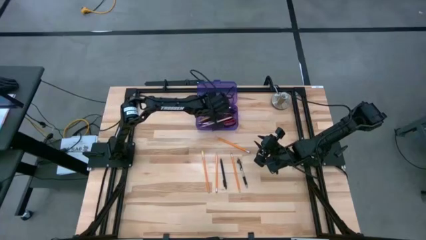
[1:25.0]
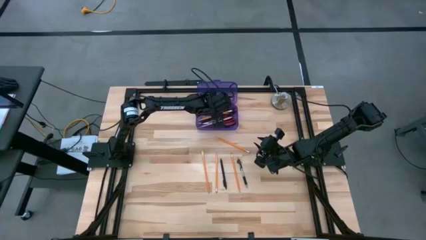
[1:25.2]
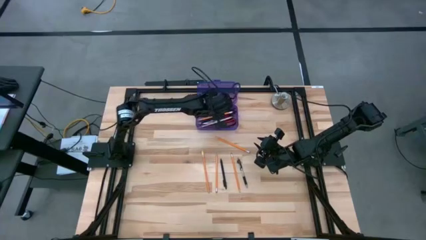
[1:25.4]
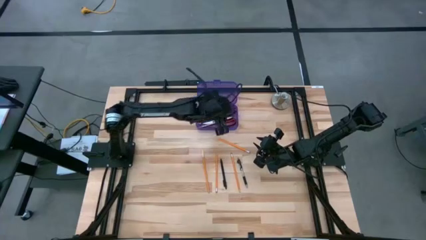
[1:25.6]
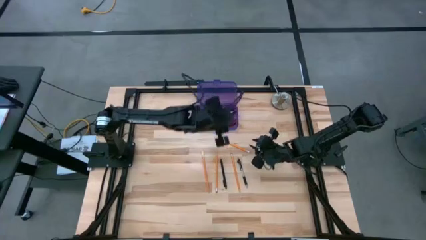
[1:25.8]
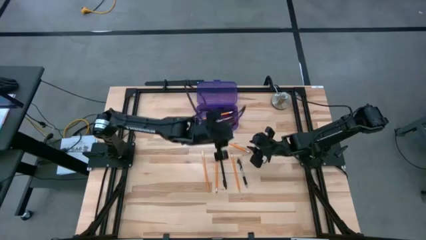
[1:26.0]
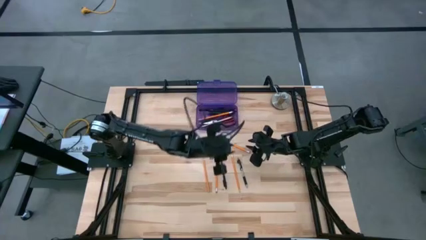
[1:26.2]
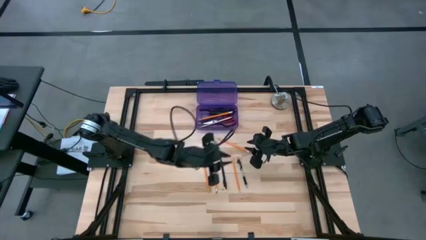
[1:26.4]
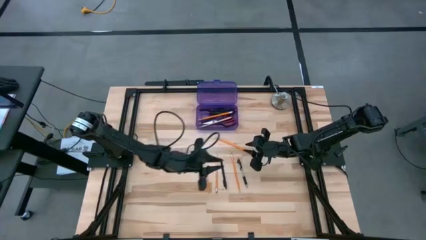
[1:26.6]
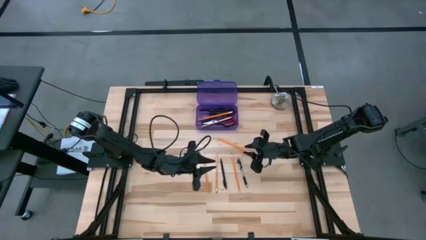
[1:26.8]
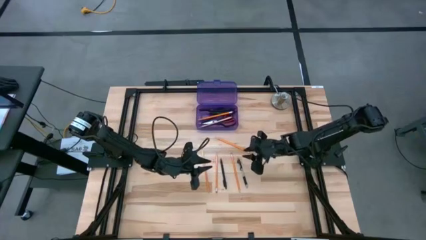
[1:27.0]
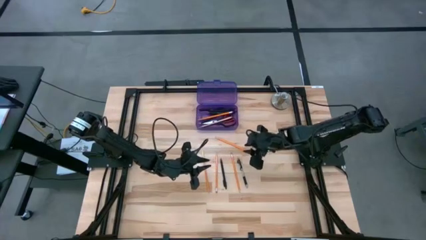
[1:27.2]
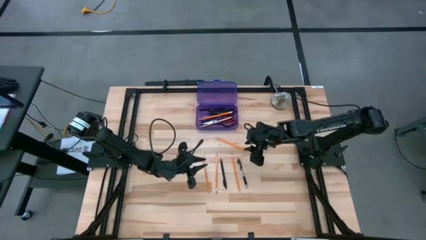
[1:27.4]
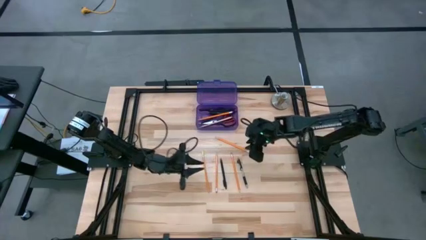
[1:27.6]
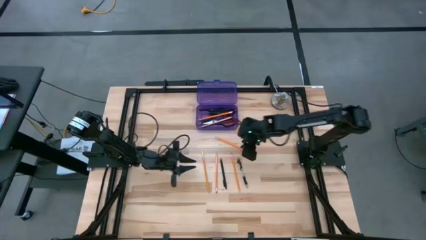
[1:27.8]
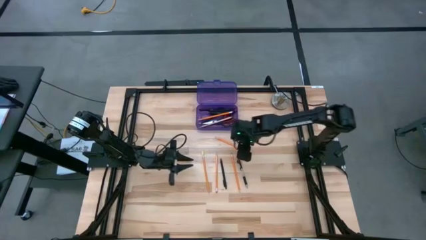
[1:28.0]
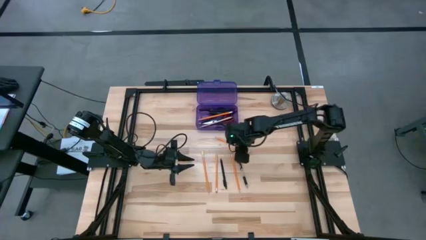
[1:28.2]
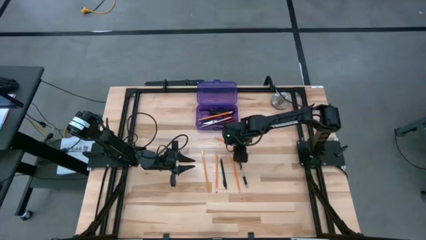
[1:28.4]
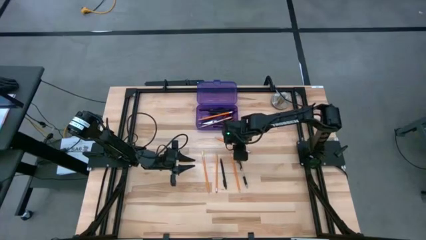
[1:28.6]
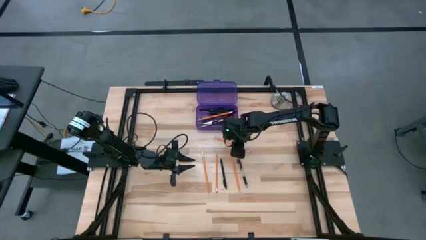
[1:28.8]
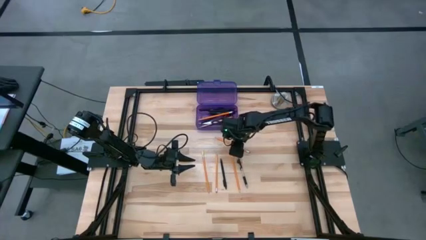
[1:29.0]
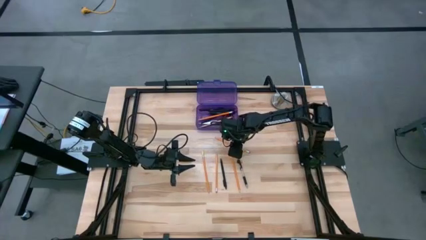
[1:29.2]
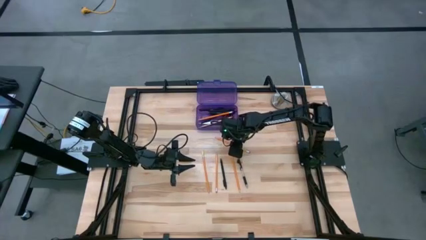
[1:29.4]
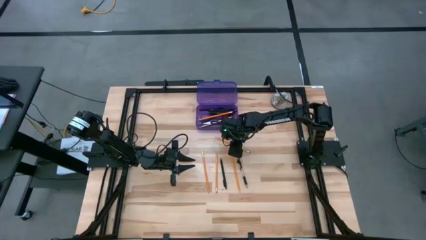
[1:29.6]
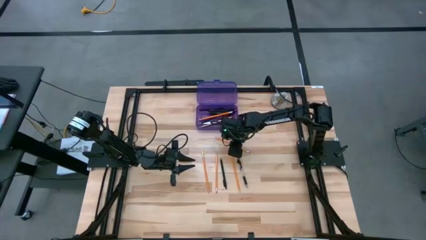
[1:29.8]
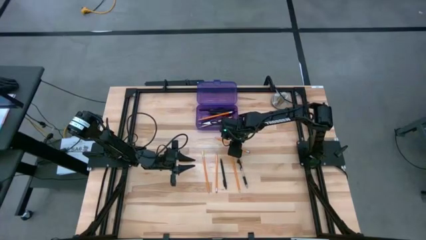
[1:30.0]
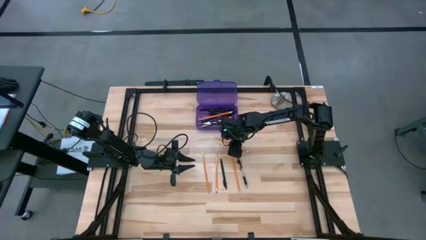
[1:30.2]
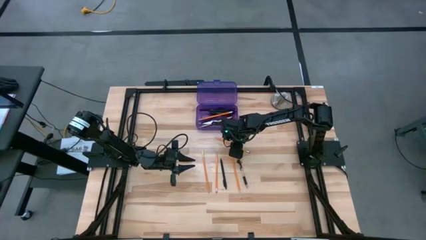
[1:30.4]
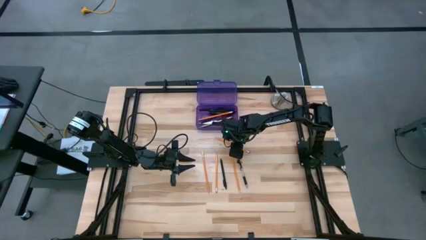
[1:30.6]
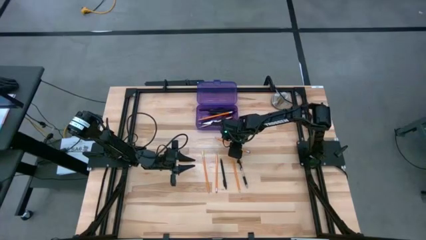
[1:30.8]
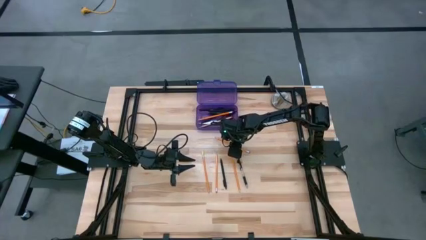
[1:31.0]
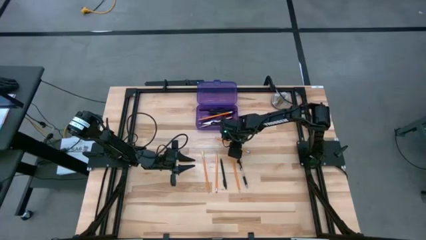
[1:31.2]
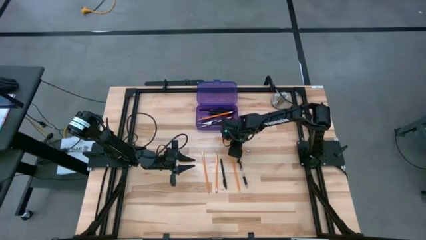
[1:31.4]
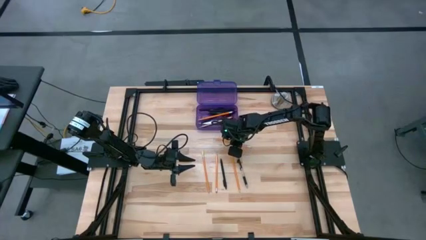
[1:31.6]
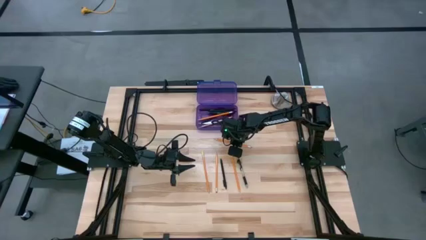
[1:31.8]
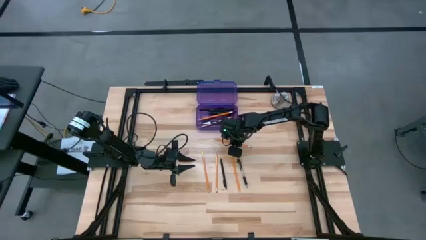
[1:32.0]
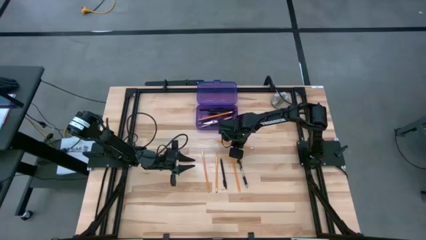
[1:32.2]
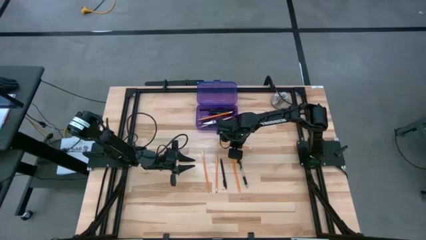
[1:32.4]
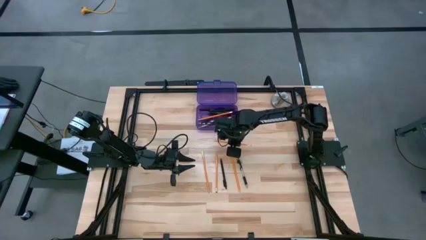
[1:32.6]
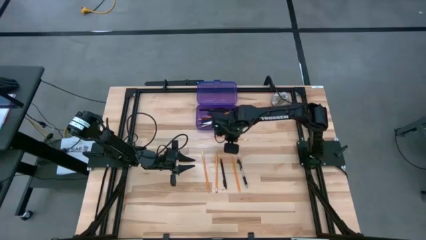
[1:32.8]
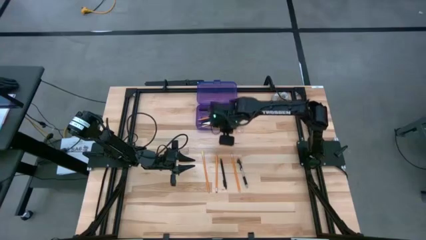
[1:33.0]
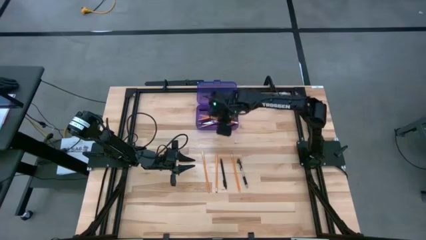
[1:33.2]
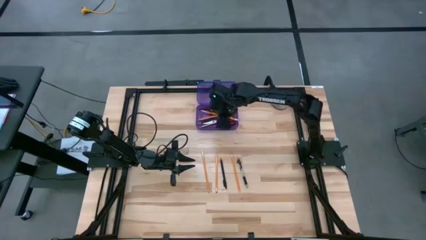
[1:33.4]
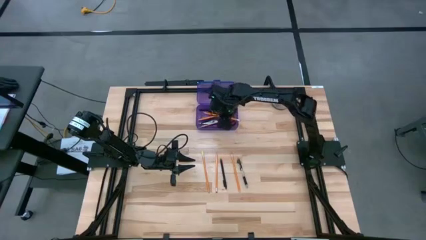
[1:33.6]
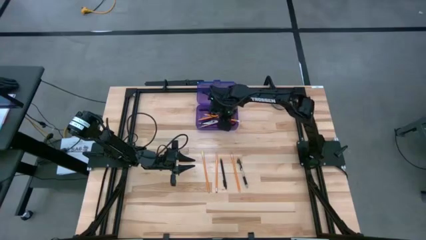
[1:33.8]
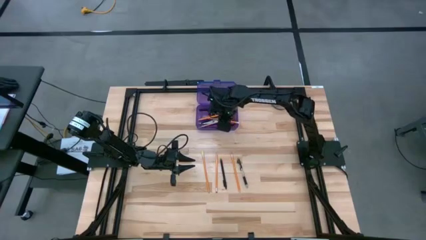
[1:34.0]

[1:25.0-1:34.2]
Task: Pick & place school supplies into a supply box
Put the orange pencil into the violet supply box

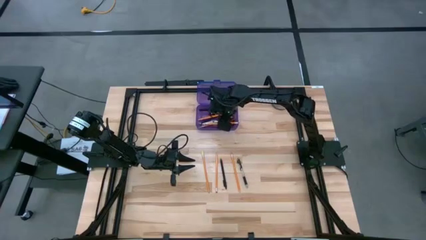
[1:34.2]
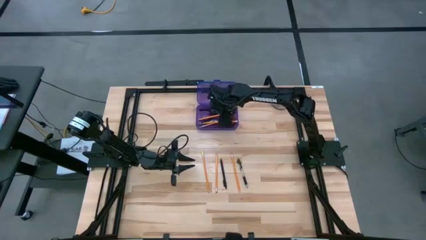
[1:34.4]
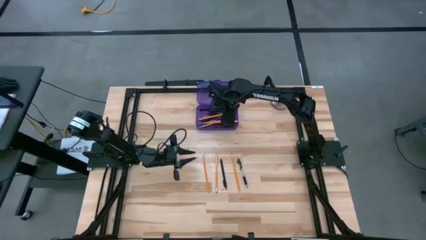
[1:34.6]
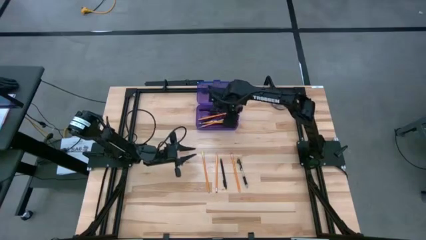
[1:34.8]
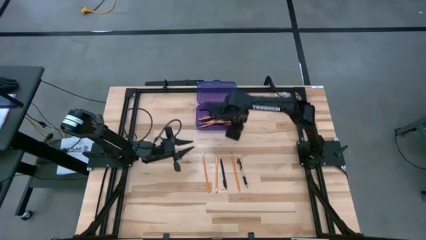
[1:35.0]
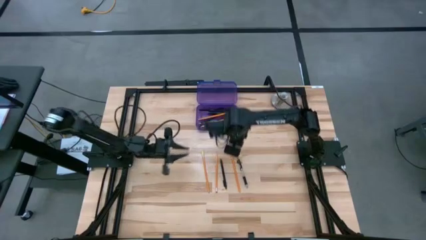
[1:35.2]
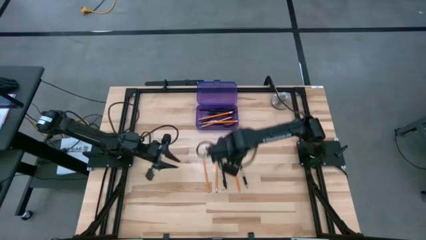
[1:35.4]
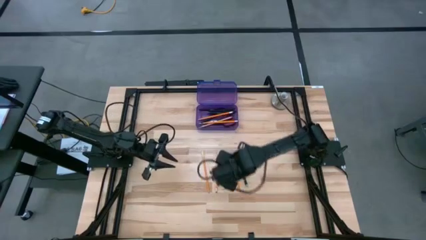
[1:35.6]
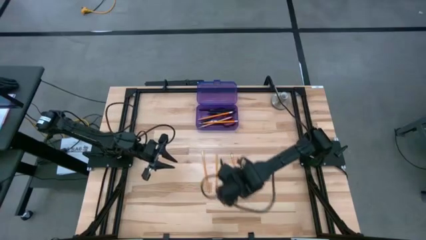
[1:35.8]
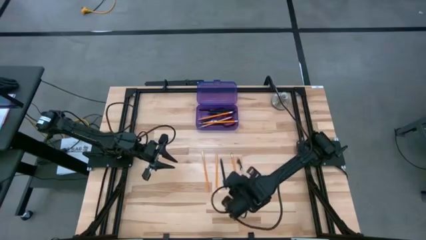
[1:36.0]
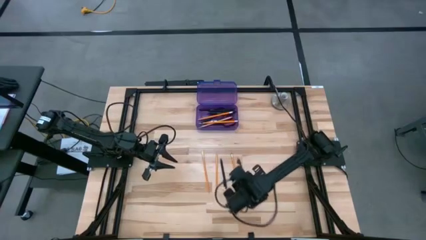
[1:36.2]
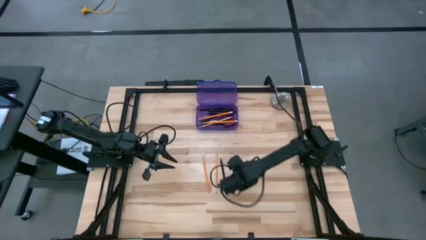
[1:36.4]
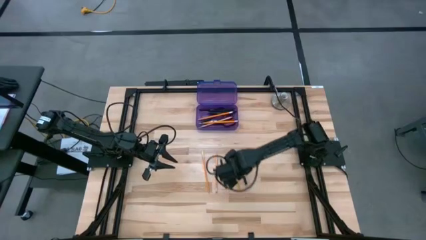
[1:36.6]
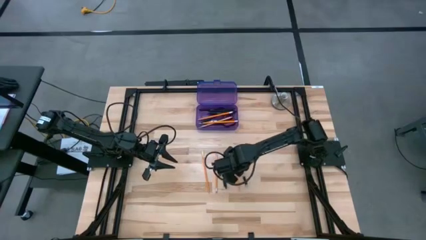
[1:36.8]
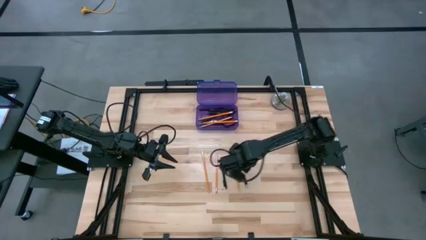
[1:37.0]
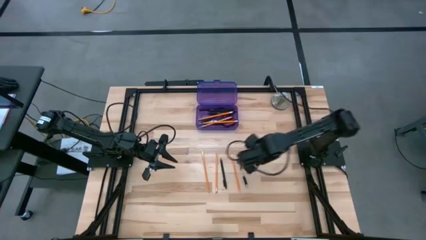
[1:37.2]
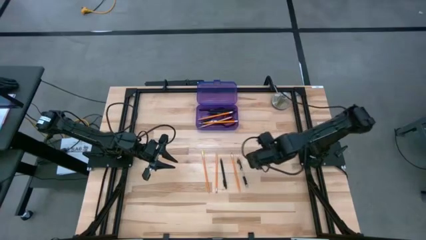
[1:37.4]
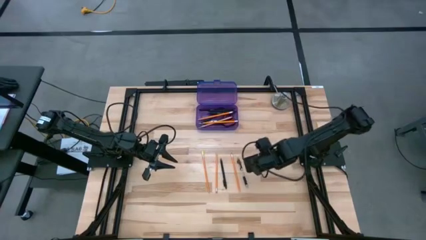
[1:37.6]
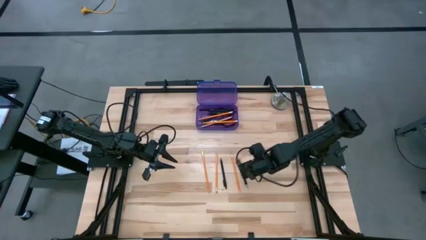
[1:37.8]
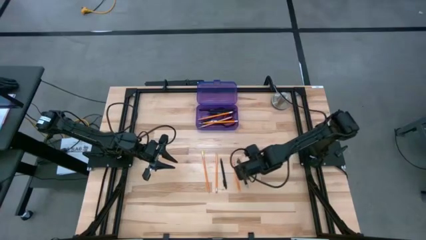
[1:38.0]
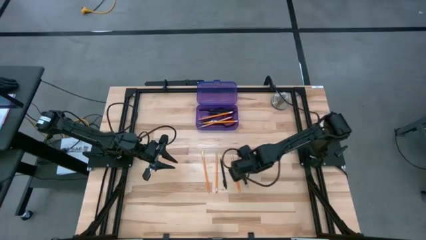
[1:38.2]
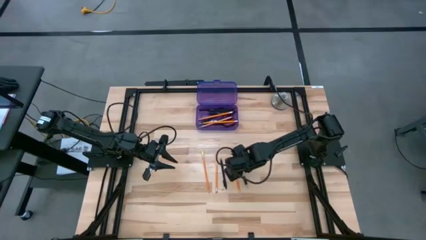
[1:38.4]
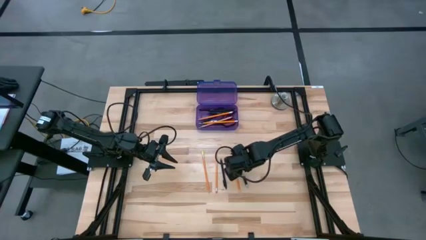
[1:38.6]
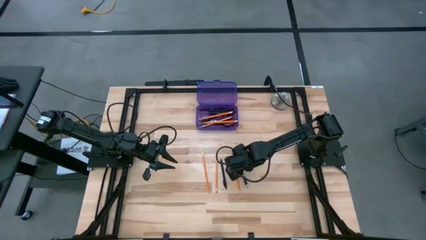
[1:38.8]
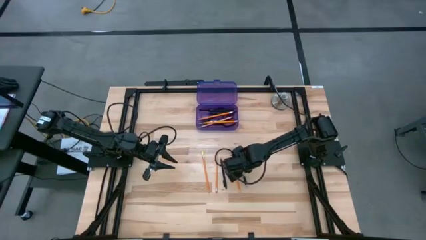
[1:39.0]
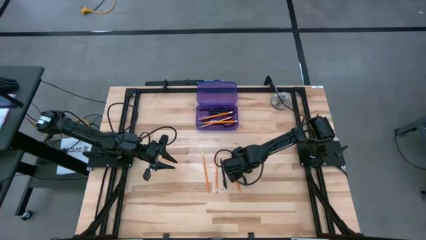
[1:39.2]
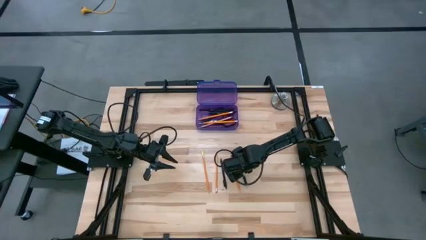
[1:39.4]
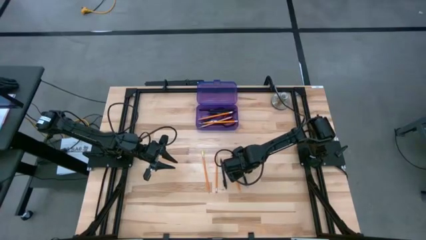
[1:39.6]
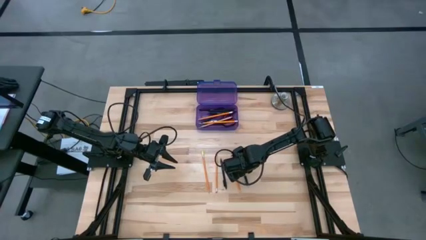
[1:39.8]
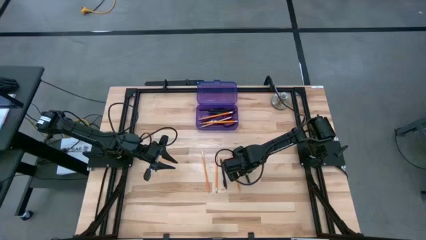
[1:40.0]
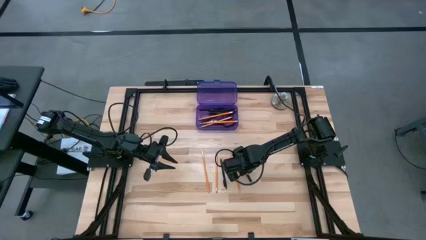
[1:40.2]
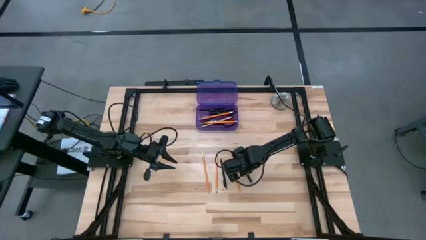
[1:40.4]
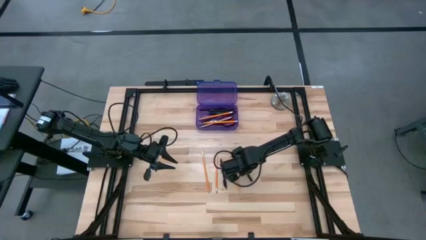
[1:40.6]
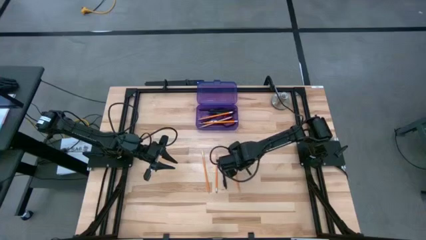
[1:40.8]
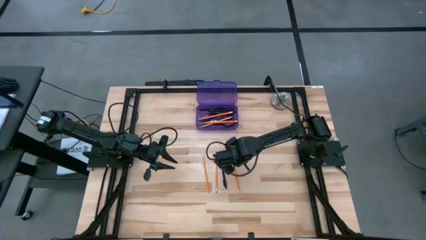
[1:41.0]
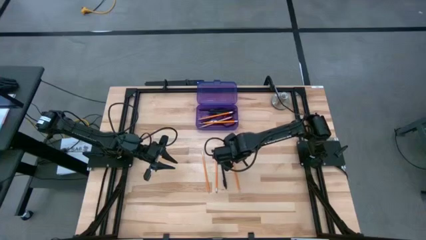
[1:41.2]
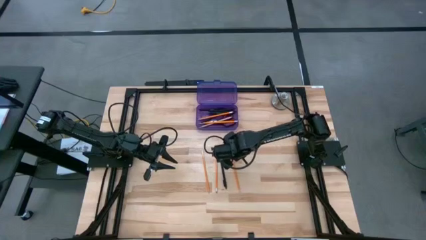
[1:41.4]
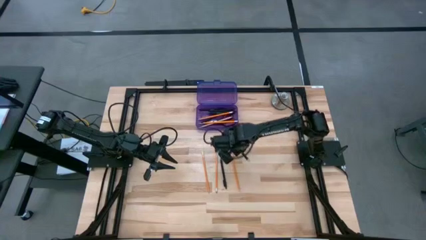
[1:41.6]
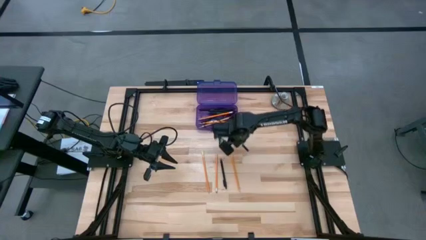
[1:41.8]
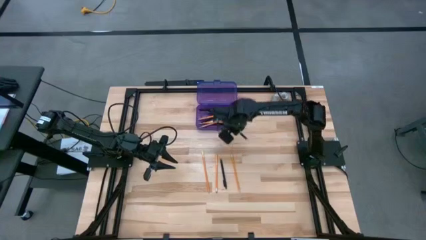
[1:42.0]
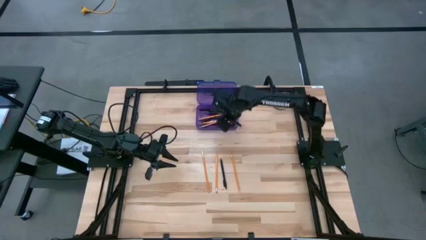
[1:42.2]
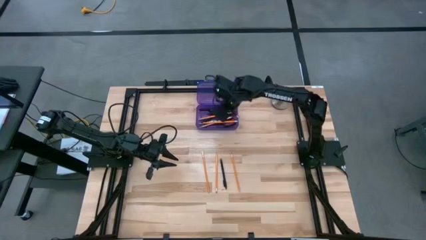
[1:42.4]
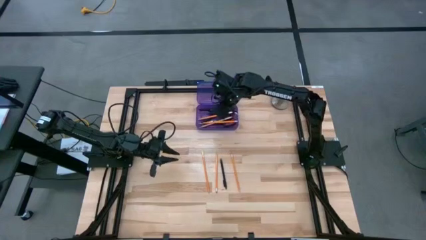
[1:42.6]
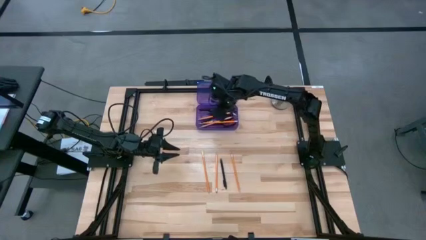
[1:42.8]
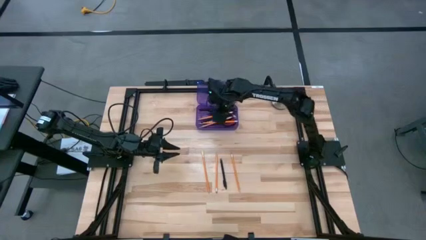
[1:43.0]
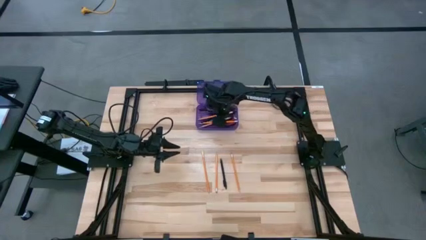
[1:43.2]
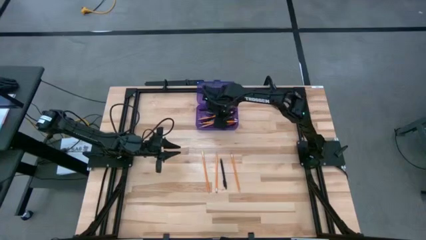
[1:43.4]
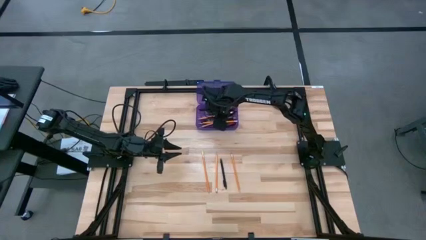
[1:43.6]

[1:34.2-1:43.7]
Put the transparent pen into the violet supply box
